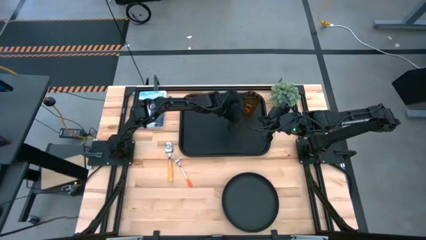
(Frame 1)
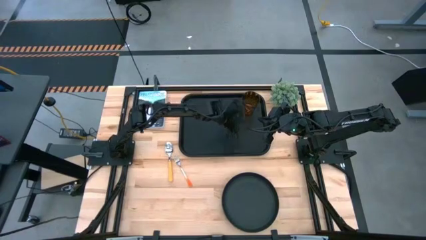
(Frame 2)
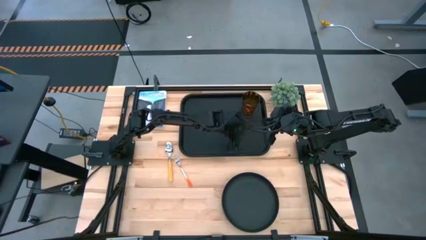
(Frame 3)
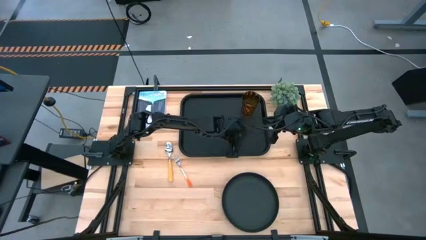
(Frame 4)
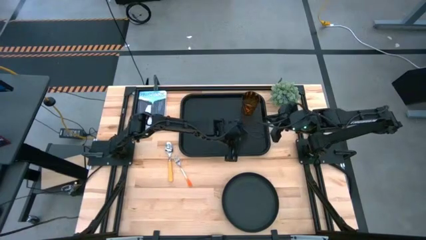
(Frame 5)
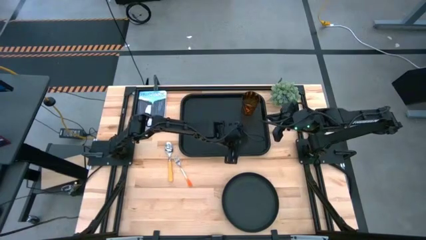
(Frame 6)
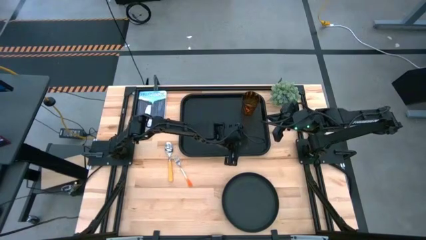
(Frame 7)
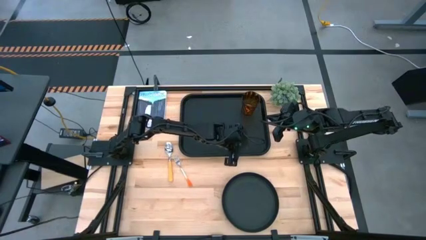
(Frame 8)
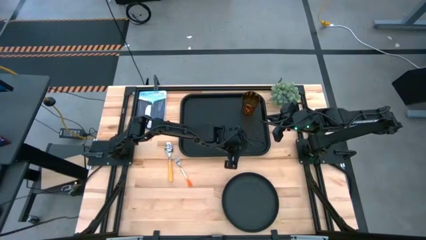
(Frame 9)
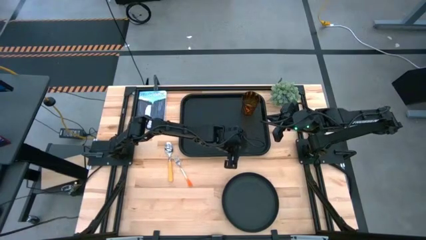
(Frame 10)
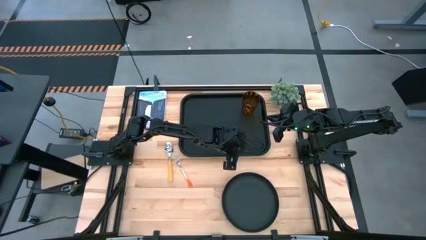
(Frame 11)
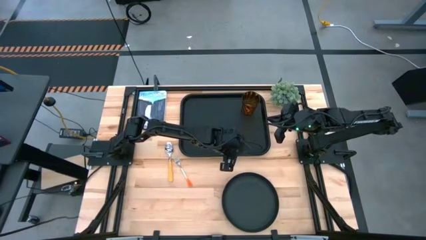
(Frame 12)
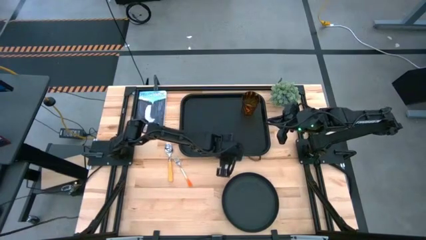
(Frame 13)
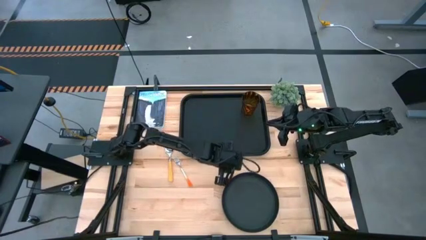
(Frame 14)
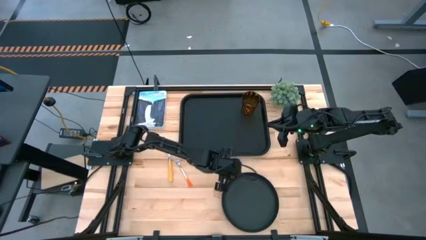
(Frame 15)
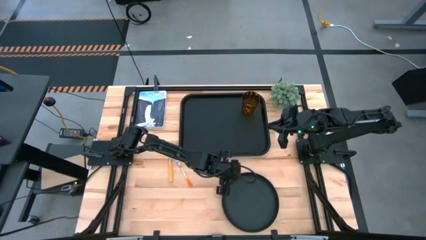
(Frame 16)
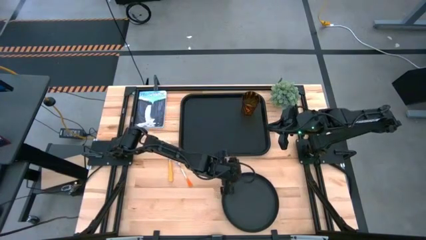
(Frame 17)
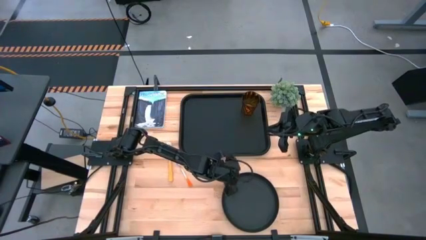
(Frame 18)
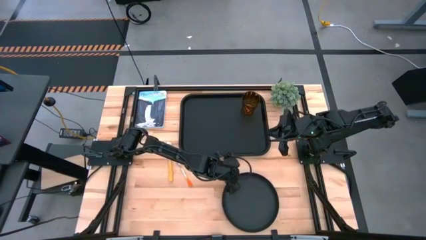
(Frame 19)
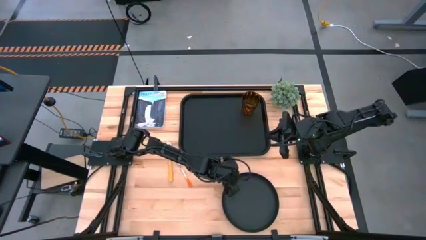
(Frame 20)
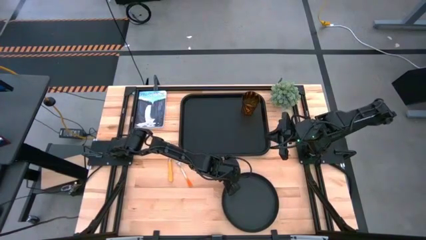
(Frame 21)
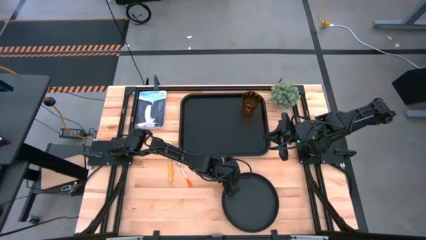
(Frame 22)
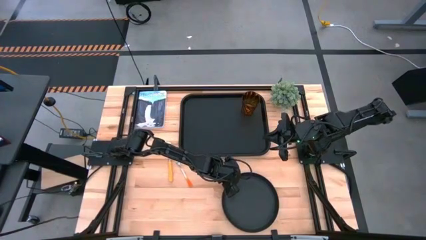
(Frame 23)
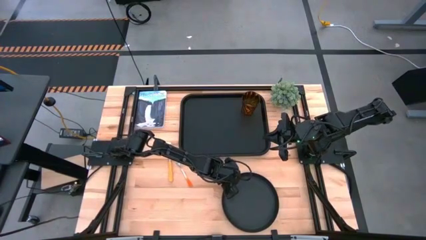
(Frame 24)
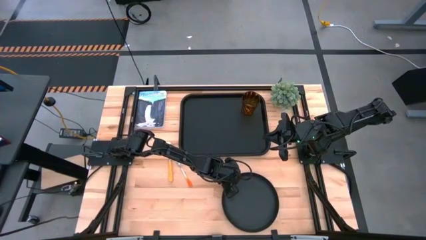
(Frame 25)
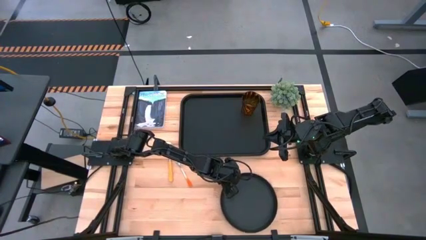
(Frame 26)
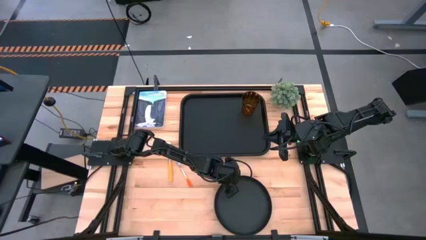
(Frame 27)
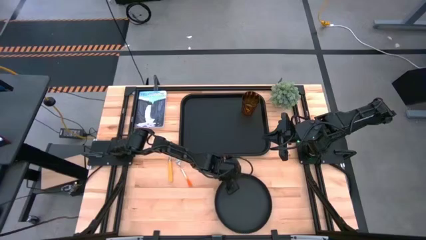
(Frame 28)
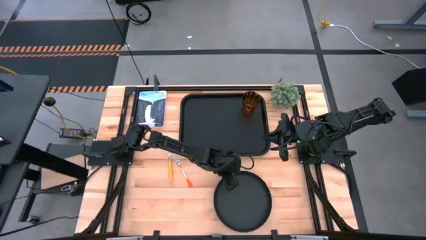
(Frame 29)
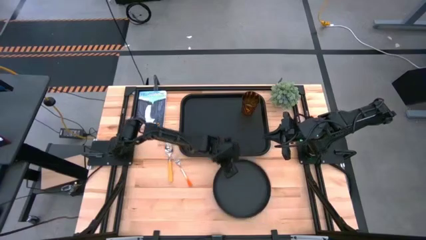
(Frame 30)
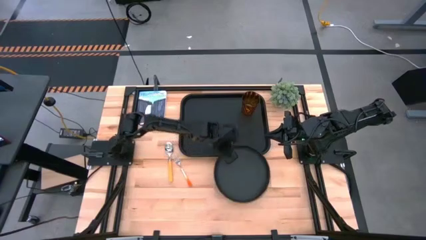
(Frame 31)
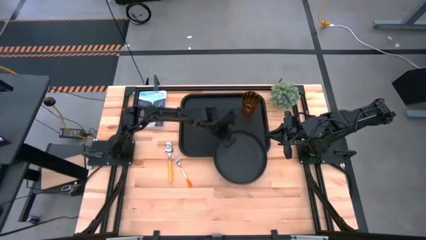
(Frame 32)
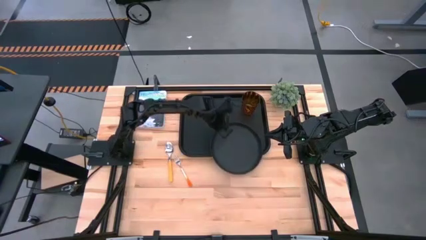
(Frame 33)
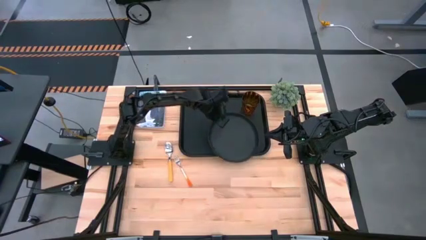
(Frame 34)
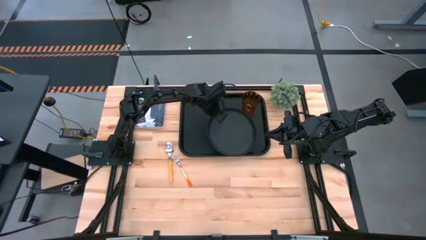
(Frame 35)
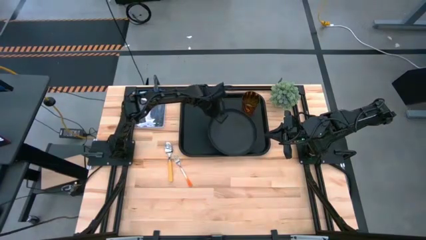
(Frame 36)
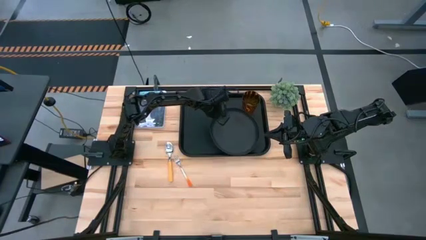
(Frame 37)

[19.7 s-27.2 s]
Task: Pick and place plate/cup/fork/spoon on tray
Put the black plate on the black tray

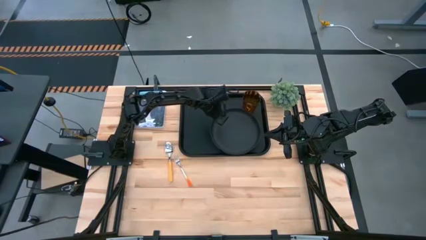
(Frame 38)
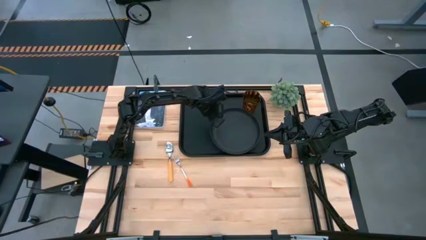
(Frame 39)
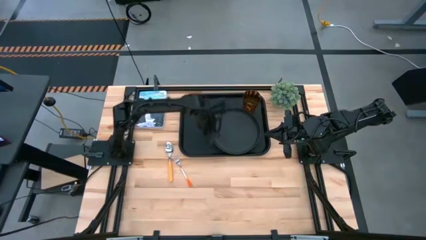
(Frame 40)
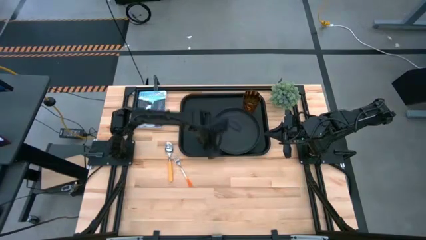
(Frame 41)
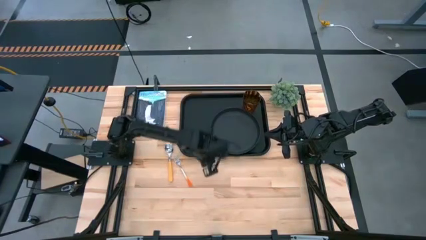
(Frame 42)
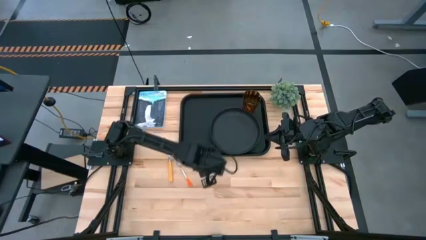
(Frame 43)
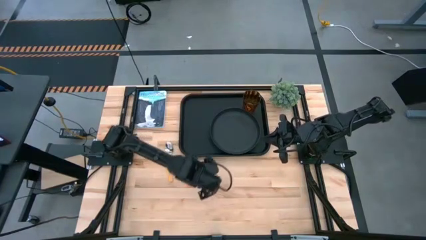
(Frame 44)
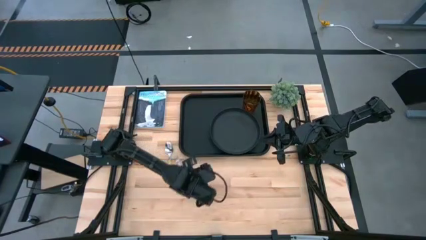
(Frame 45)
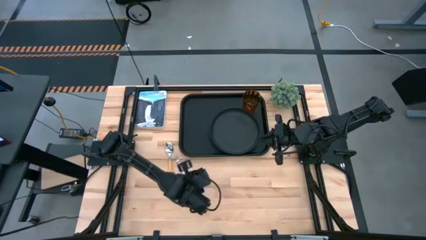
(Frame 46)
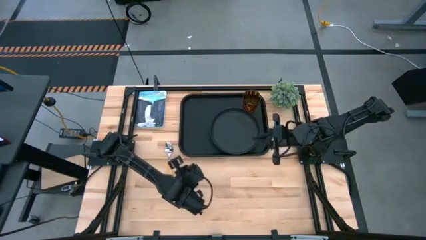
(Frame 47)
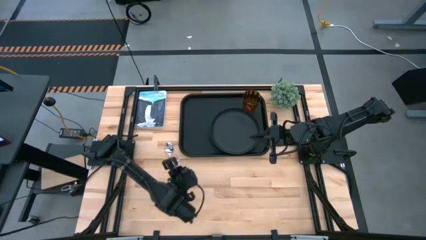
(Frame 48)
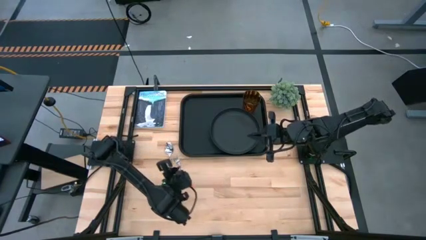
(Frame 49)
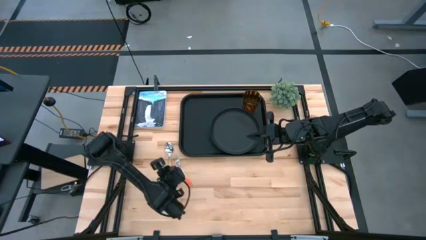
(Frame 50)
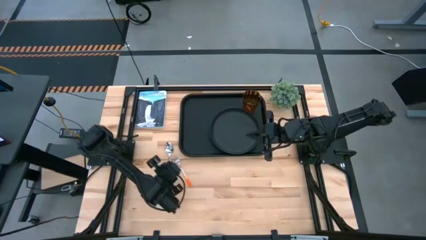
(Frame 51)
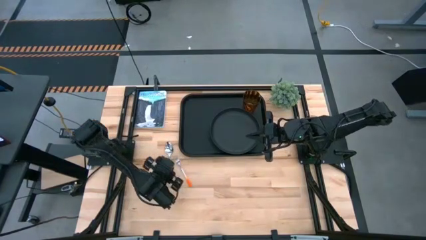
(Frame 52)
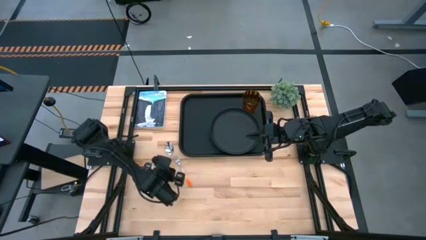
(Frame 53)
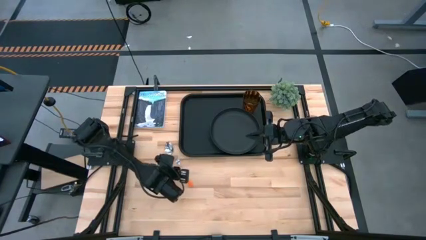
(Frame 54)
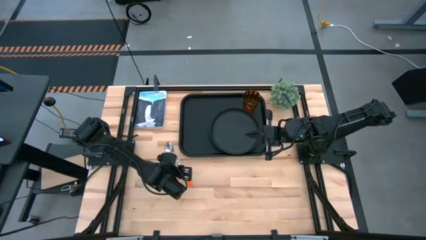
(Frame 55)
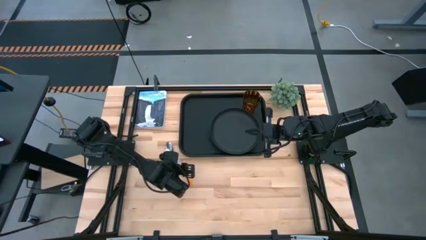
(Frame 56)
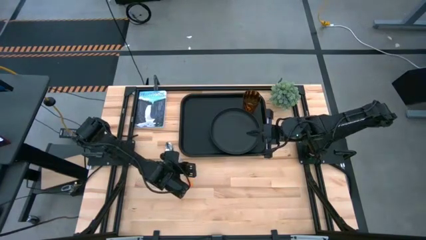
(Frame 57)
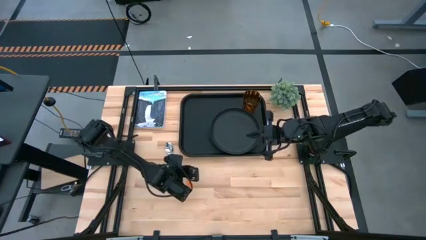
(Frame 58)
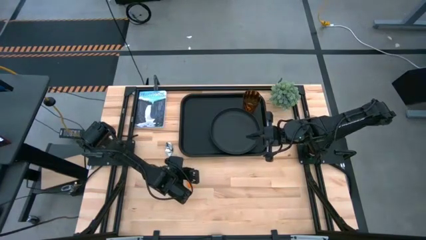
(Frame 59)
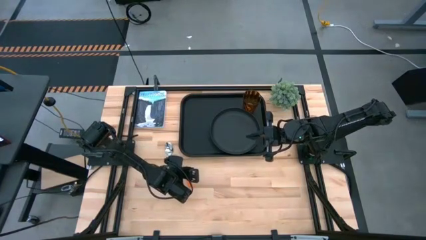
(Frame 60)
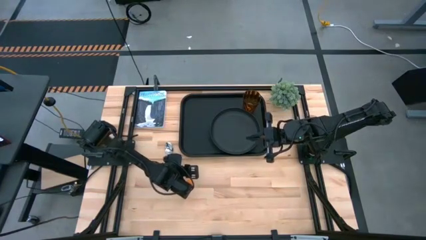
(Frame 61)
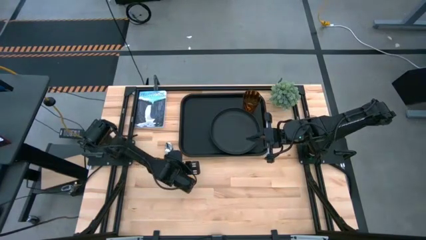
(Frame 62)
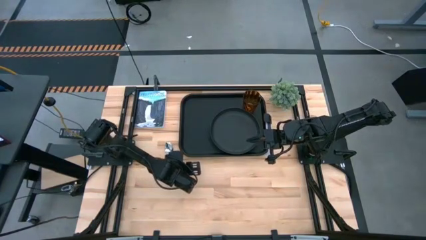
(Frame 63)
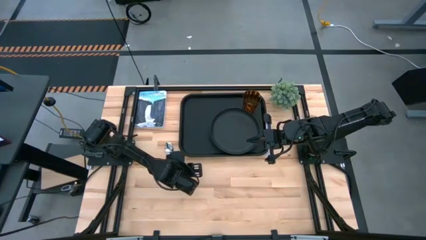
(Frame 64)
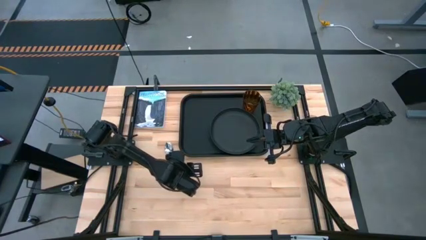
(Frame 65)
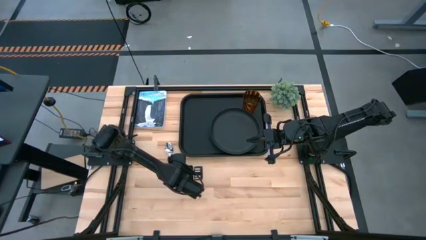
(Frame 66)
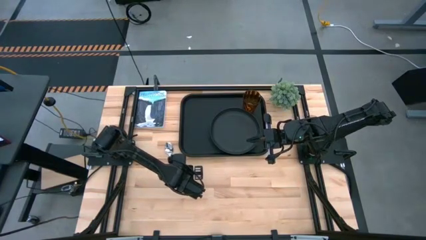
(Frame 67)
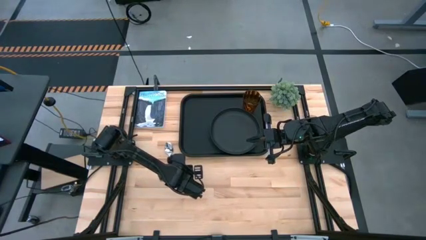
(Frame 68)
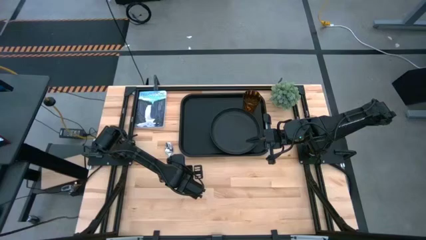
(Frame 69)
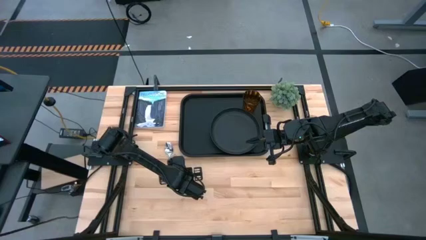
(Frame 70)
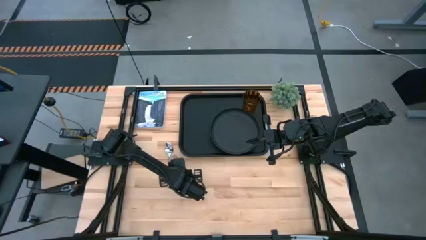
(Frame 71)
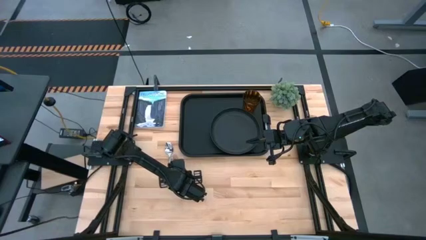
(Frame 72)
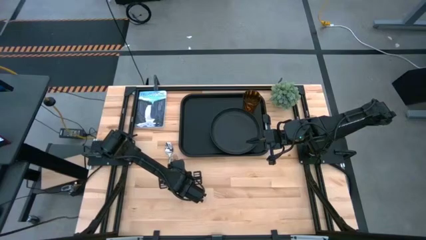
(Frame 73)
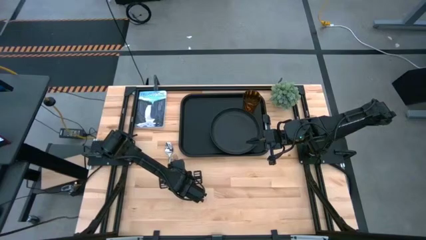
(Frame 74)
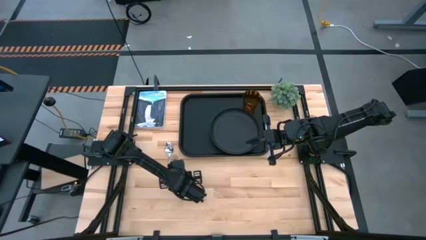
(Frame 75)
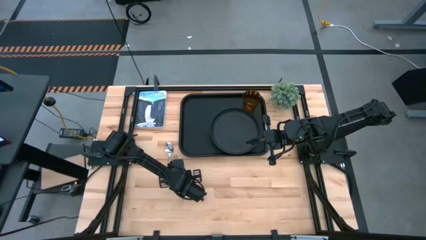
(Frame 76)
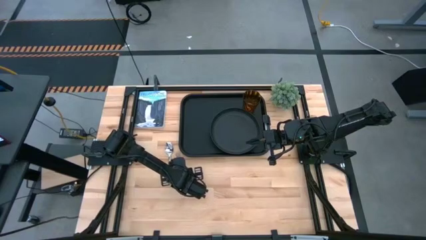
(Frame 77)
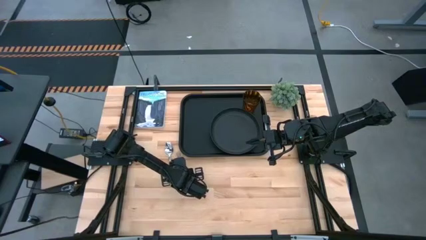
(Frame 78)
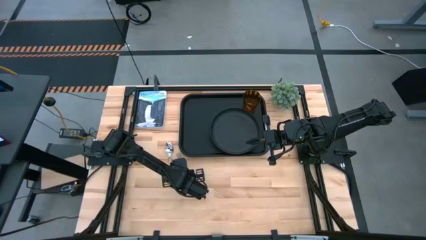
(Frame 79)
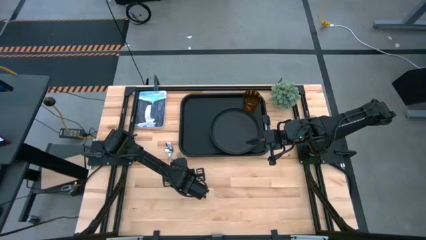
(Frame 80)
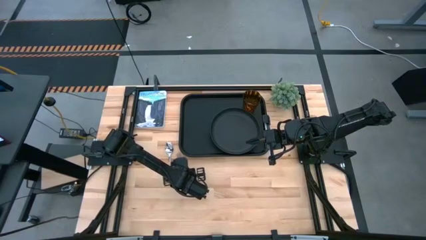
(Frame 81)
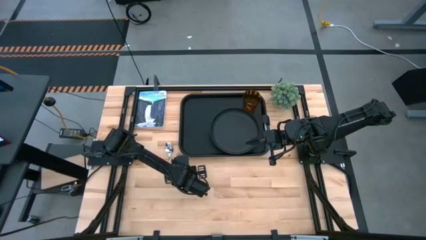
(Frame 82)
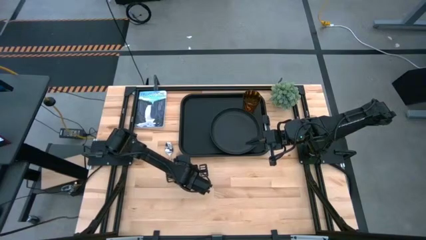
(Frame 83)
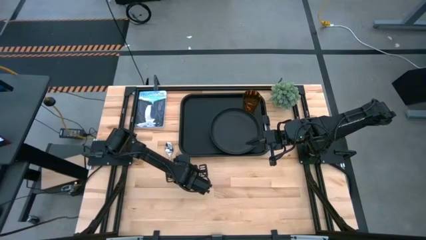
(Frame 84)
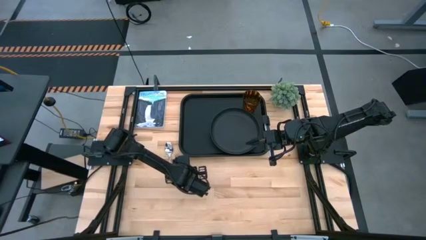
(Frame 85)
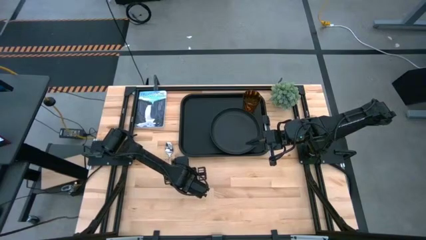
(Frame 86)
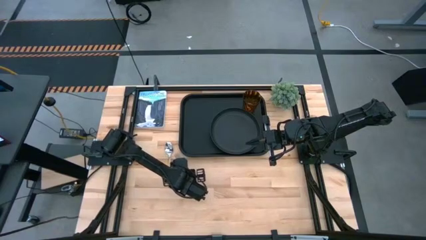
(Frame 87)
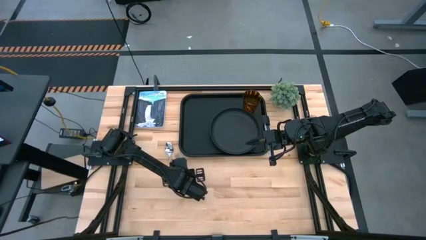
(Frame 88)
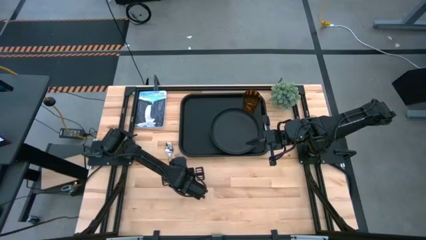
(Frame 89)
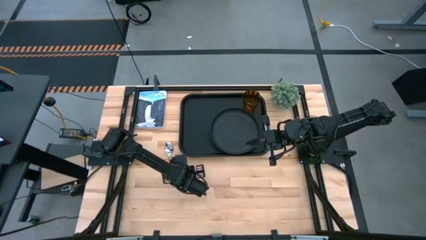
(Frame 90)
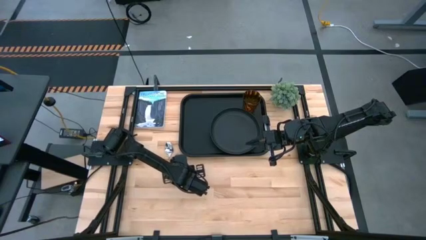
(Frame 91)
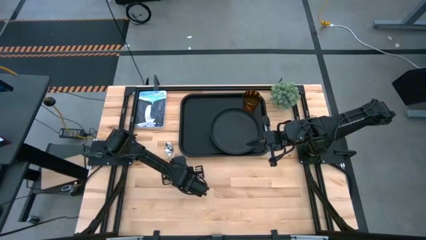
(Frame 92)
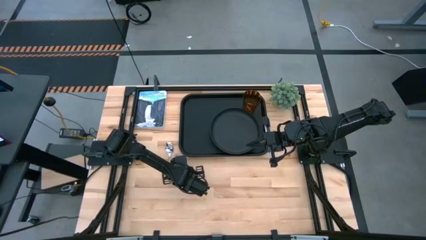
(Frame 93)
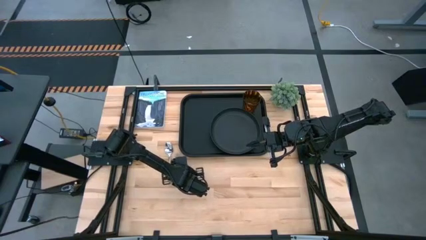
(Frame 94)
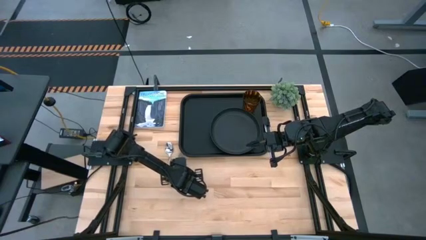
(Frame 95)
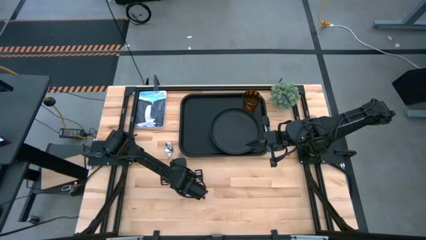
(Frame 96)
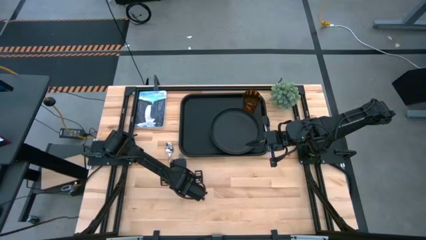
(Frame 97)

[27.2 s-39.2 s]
Put the orange fork to the left of the black plate on the black tray
